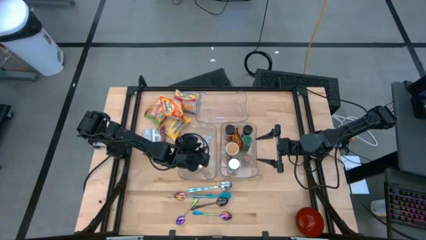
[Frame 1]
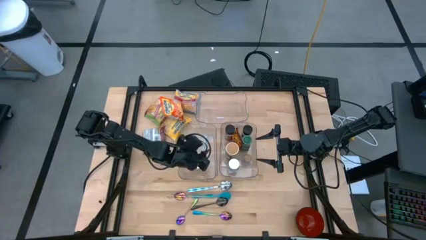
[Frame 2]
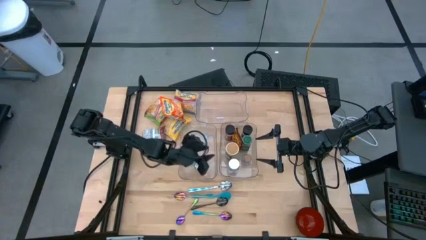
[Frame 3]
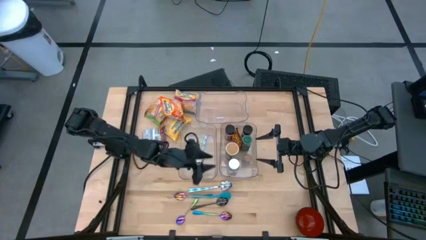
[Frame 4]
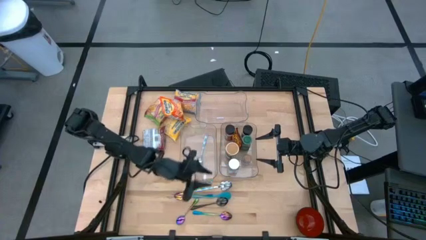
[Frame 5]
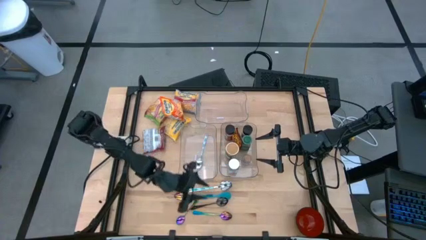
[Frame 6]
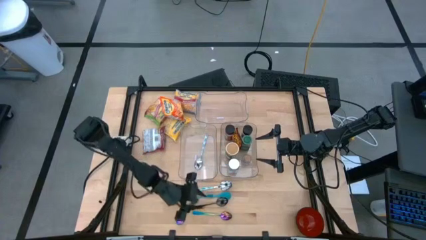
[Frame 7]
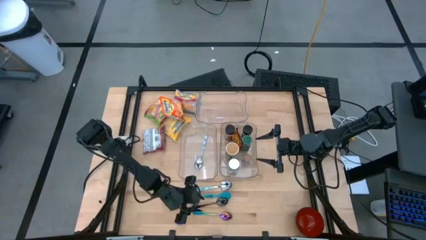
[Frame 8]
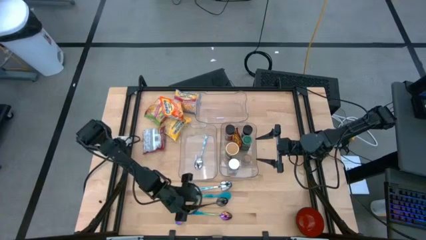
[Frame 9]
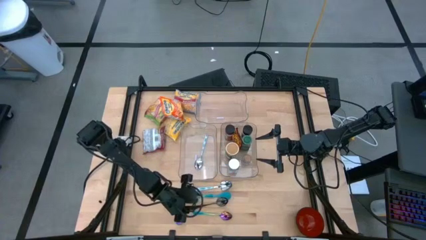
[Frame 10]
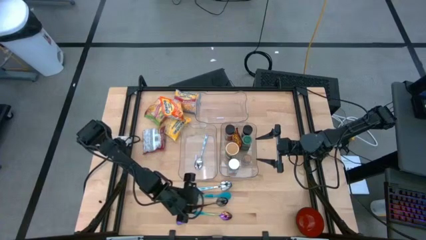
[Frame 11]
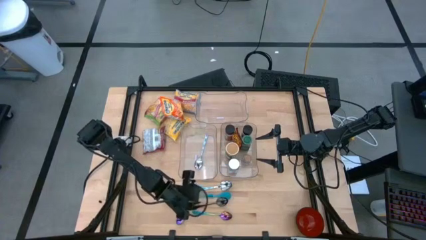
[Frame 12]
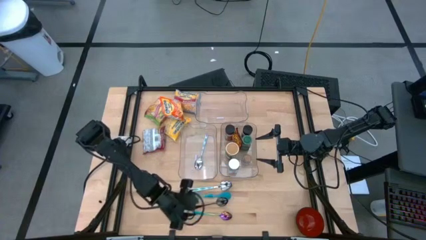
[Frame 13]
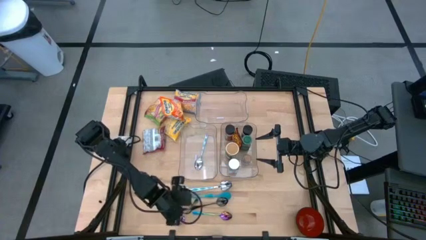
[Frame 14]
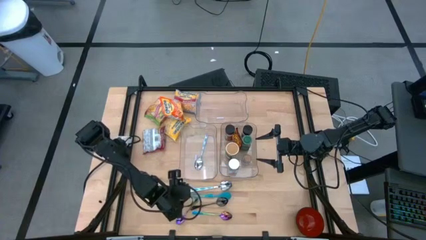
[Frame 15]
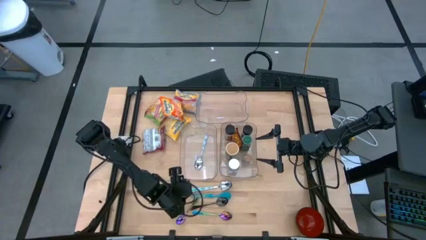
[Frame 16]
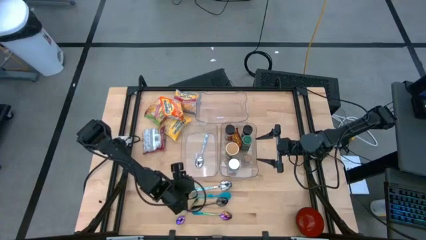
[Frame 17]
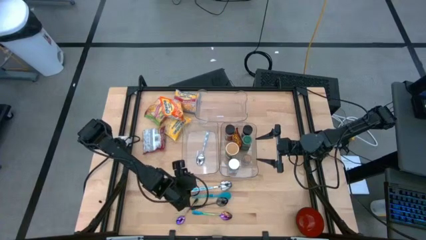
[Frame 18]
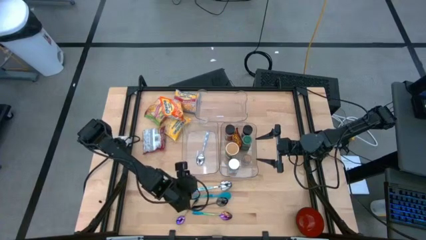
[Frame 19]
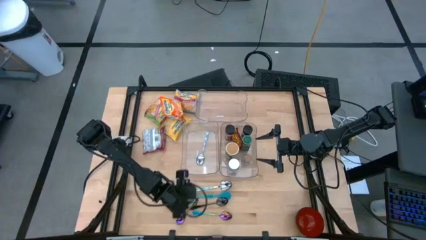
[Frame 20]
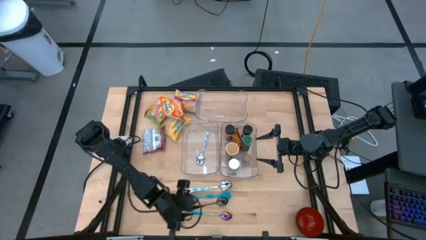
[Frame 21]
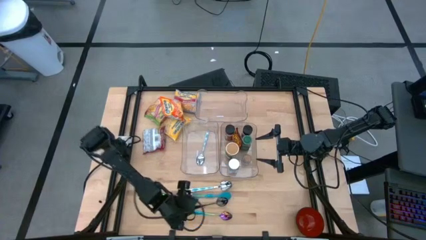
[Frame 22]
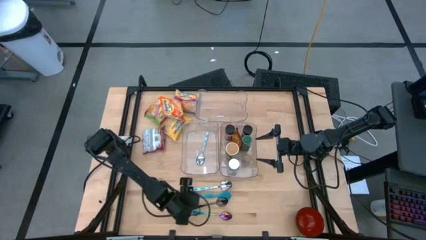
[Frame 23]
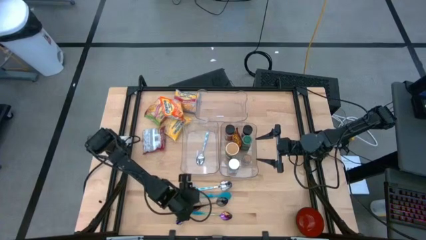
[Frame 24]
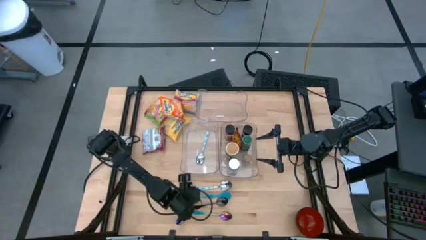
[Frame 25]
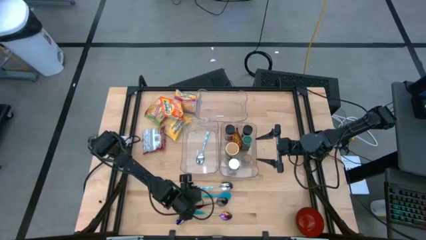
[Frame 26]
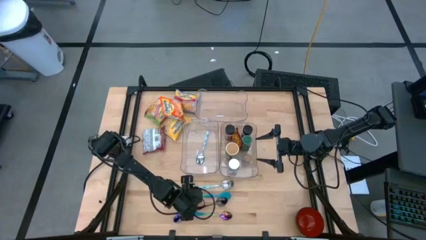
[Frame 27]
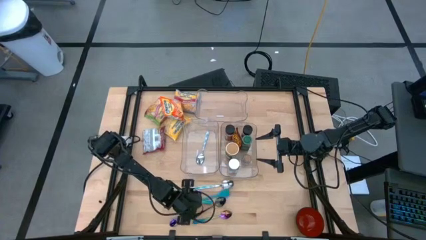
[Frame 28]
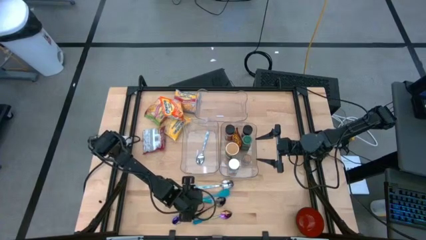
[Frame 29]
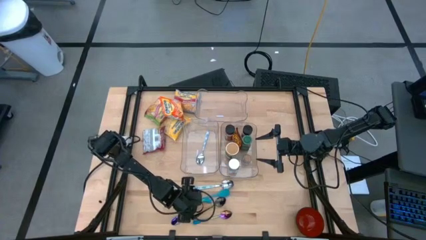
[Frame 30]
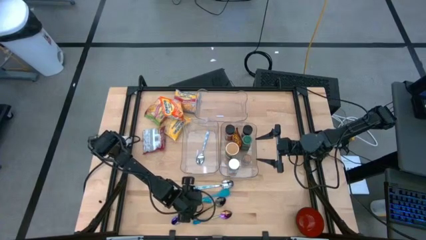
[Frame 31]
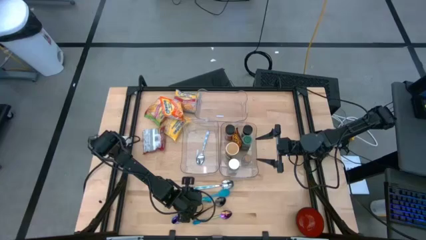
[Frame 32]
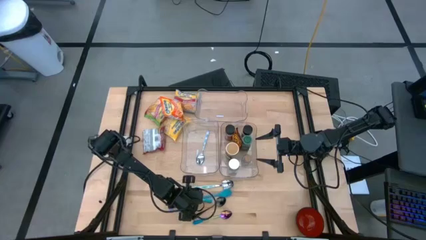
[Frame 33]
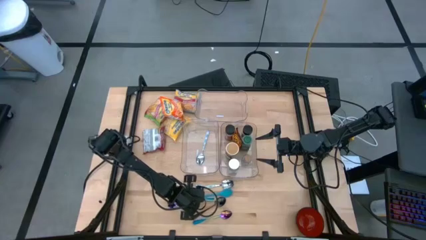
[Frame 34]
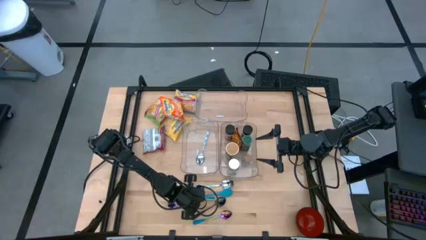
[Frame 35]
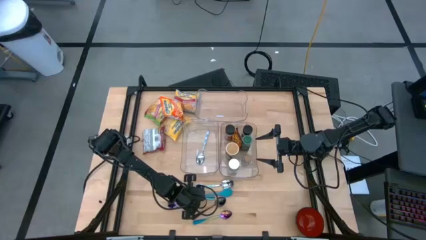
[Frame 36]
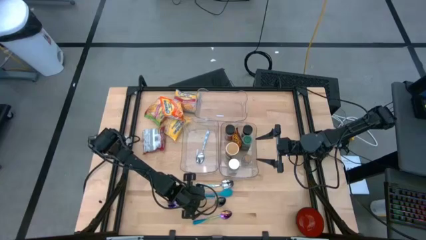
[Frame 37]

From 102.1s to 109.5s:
Task: Pick & Place Food Item
Put the blue green spoon into the bottom left transparent bin

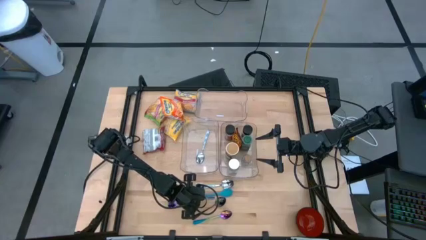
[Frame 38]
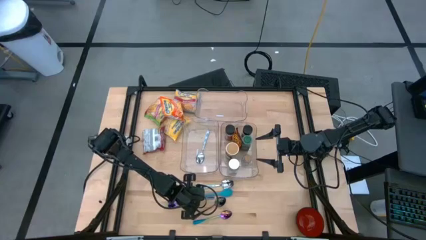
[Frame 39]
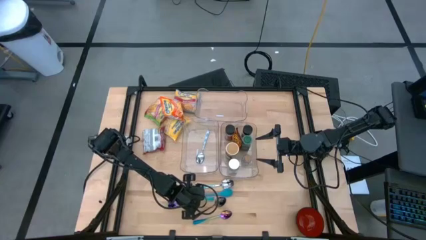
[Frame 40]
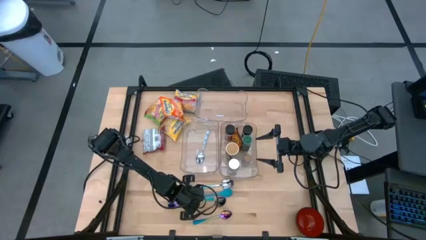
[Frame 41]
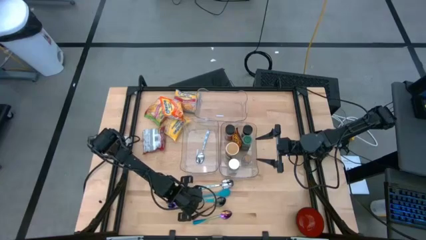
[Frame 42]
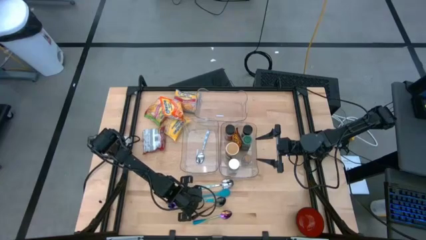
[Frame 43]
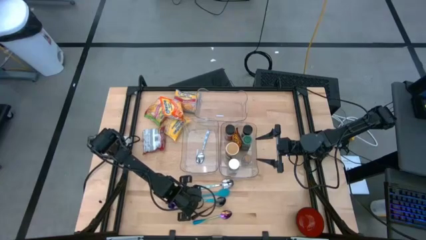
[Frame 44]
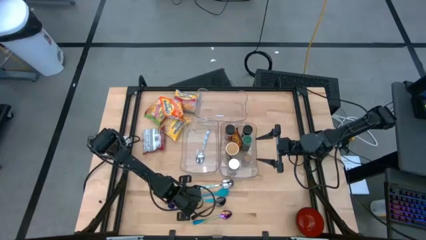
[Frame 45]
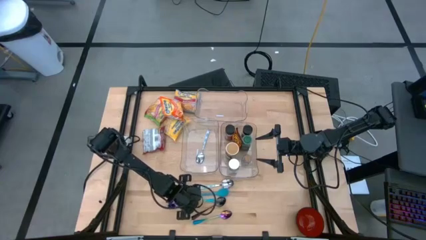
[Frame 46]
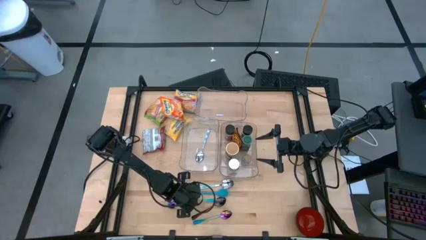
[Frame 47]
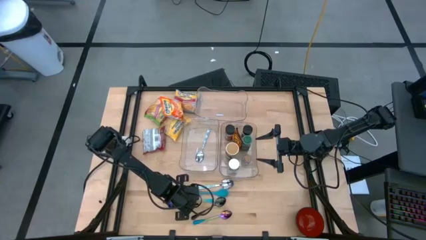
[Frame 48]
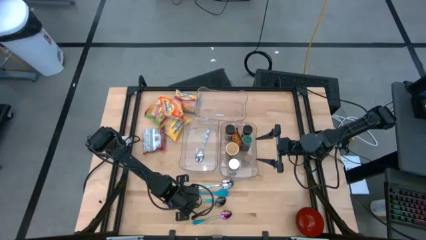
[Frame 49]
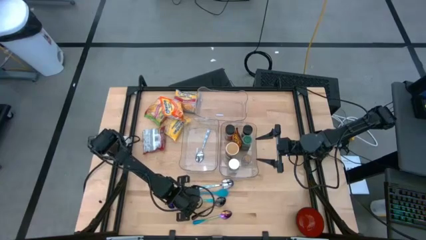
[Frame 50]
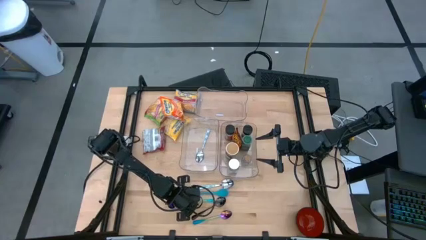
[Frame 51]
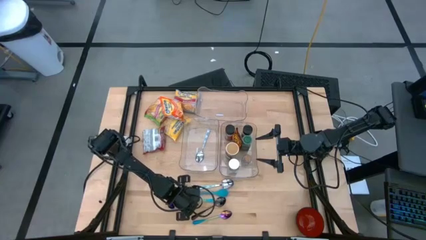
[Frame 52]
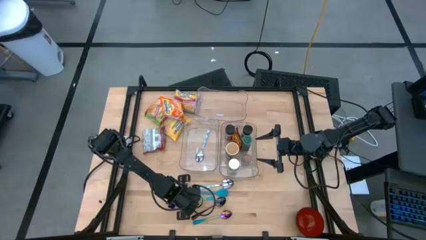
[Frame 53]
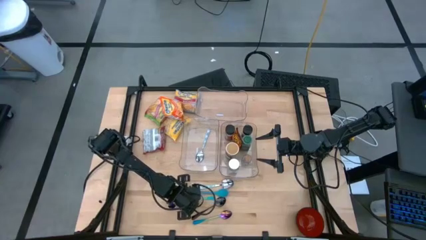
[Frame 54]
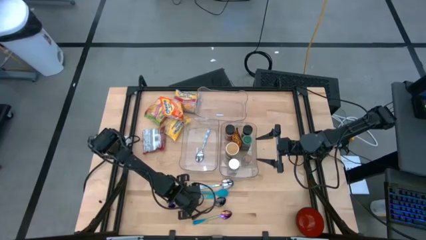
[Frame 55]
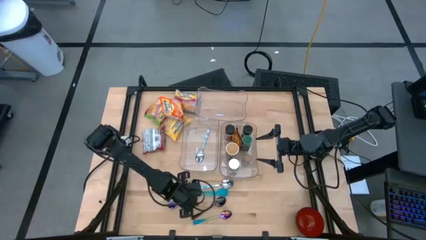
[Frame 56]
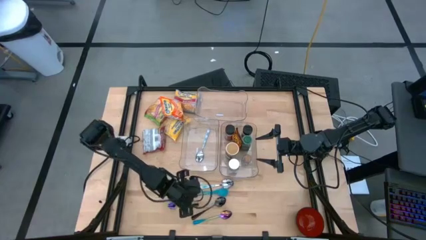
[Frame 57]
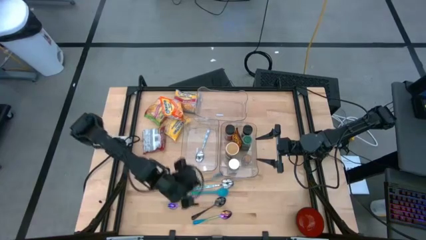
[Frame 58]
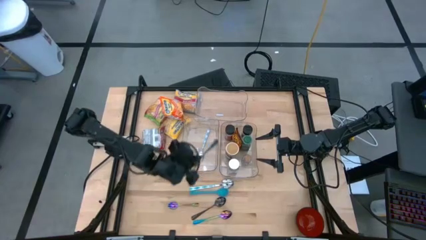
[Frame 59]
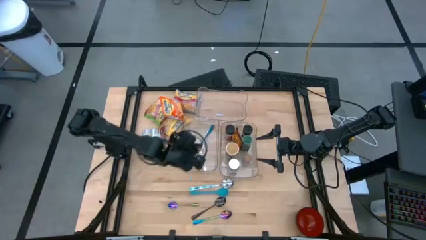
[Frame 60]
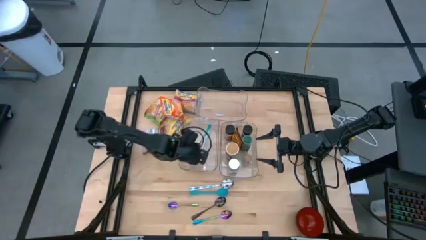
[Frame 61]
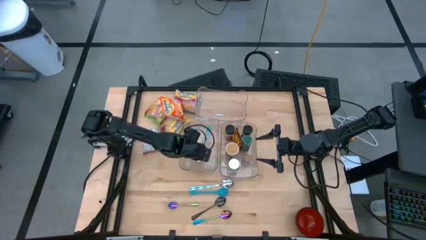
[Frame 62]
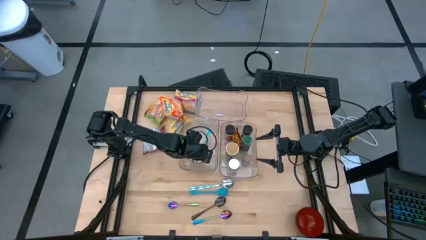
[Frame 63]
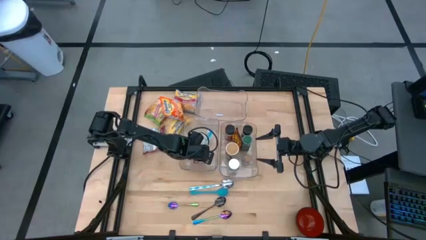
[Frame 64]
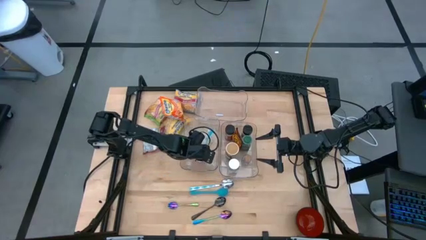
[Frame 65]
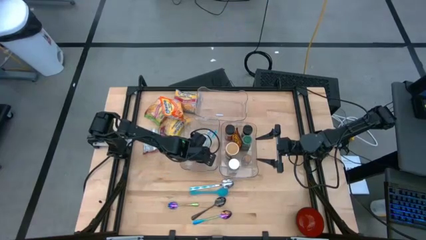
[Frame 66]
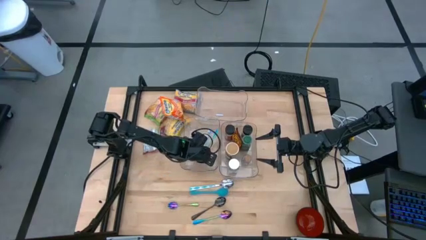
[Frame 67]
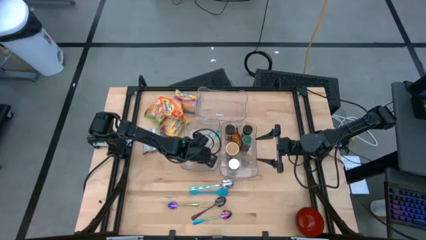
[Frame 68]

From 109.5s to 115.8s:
Put the blue green spoon into the bottom left transparent bin

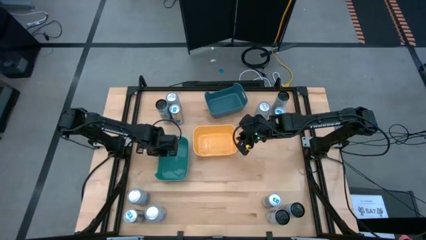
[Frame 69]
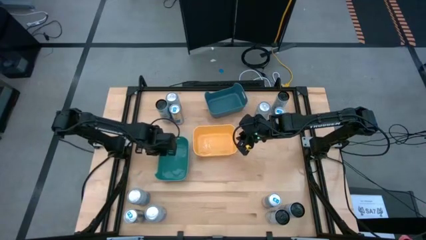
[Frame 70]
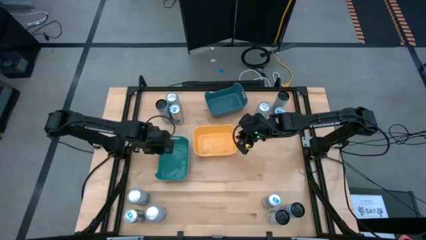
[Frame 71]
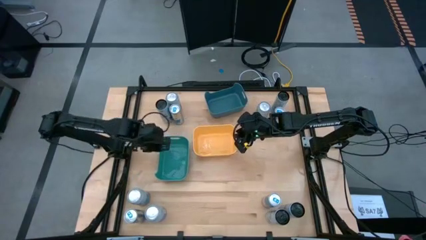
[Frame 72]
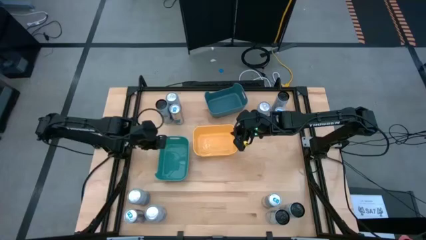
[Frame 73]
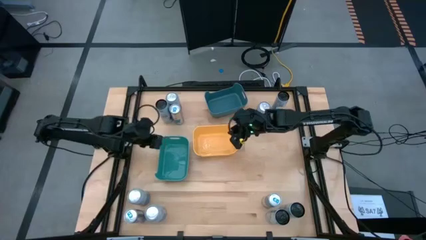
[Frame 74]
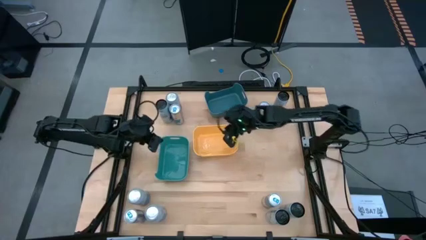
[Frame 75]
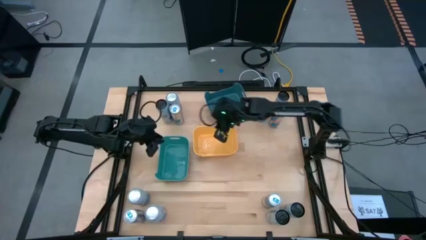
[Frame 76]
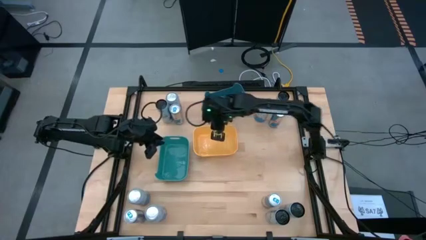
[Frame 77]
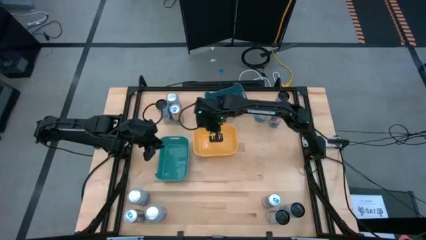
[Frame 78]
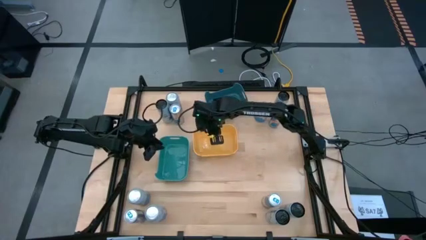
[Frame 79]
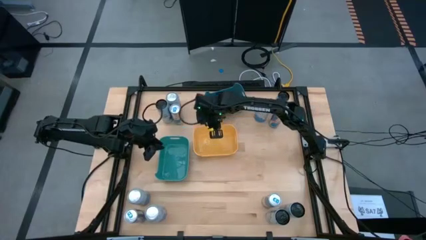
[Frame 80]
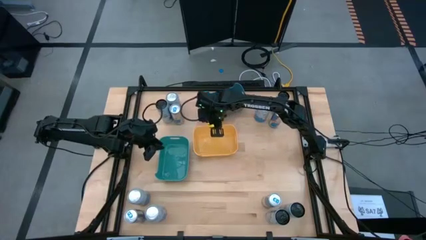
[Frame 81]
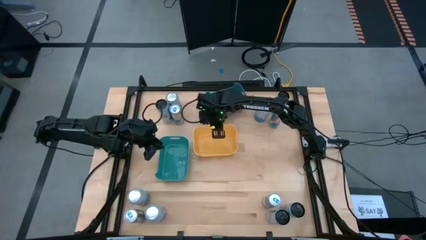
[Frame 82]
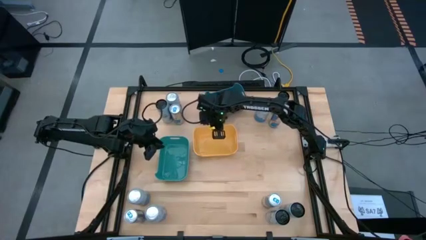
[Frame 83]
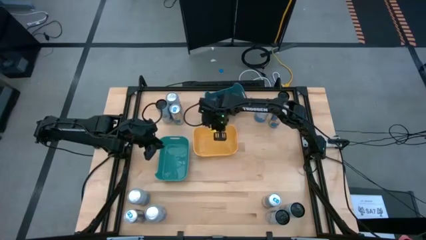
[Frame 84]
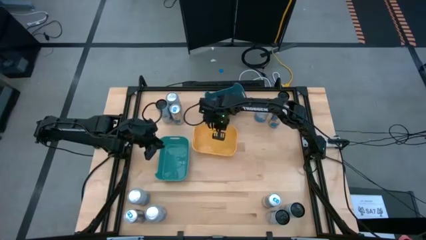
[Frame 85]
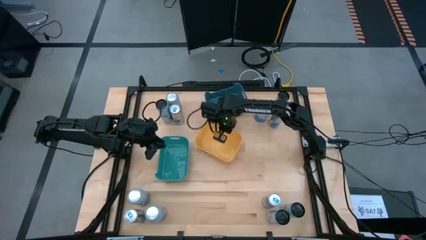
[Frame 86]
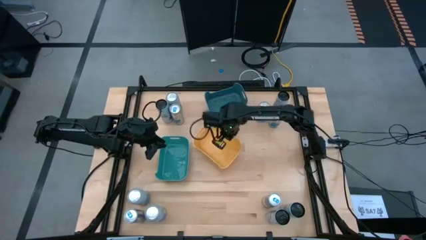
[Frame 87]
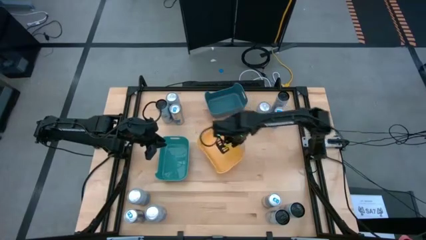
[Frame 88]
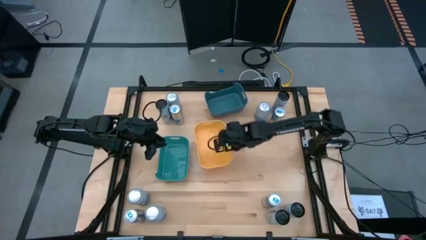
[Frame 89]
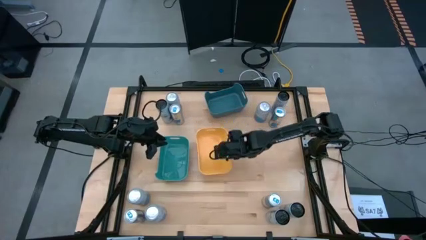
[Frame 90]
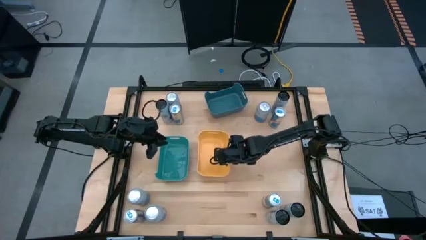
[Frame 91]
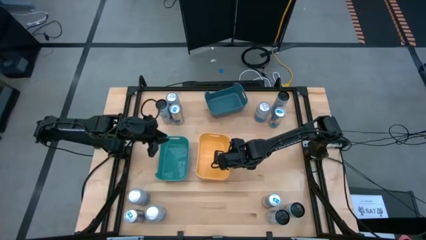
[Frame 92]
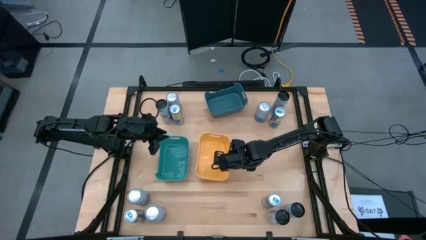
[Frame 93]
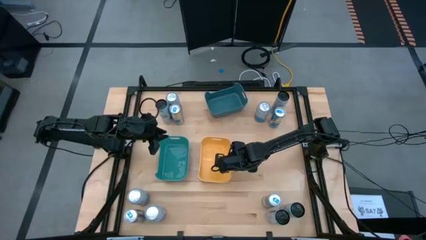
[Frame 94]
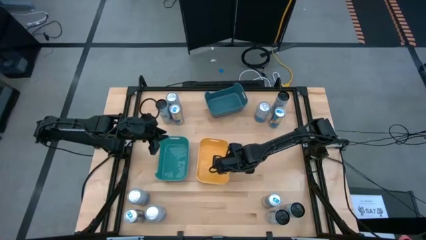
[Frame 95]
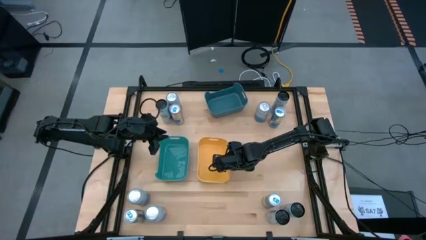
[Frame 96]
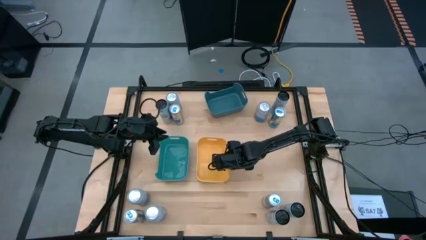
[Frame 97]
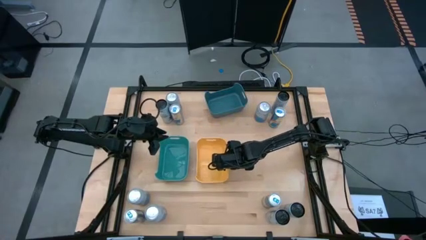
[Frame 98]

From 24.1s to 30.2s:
Task: Sort soda cans
Adjust the yellow bin with the light green bin
